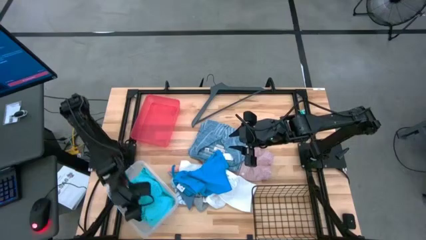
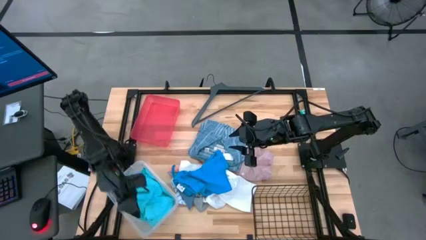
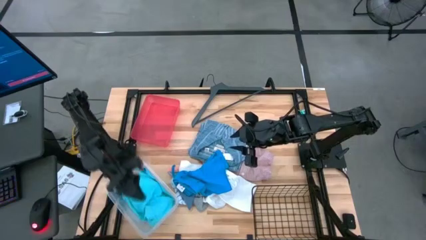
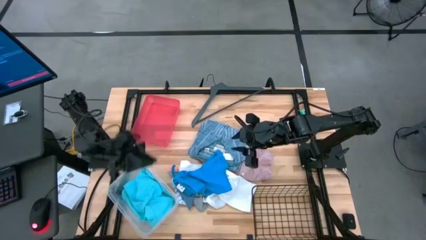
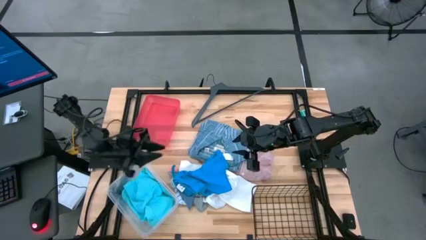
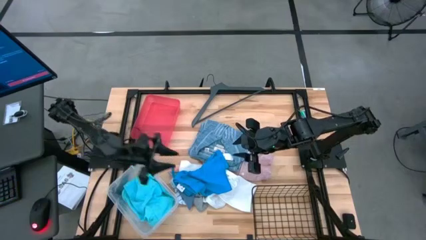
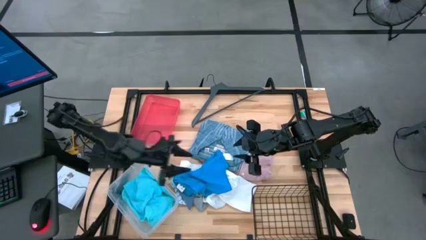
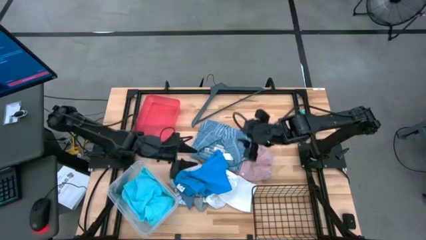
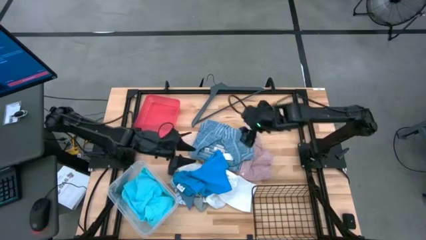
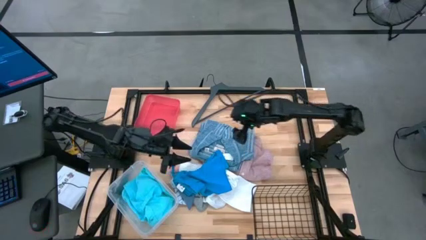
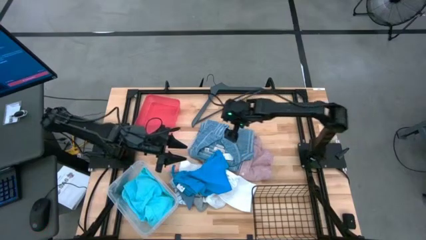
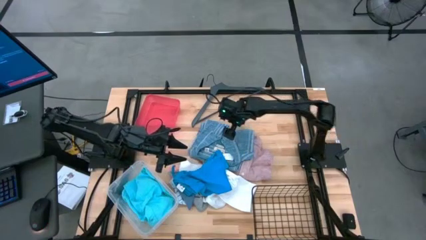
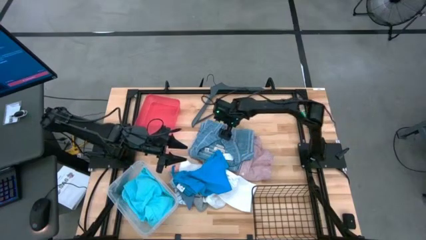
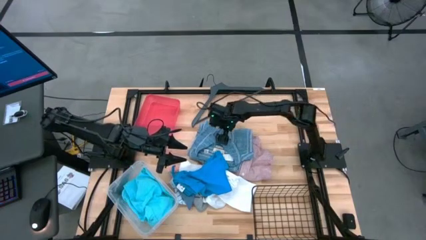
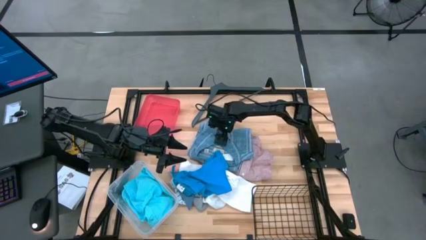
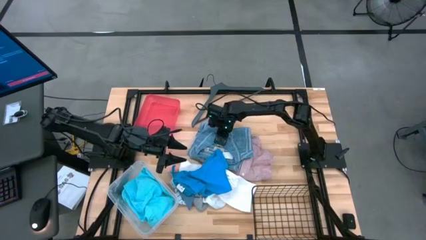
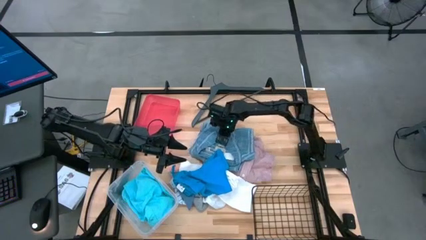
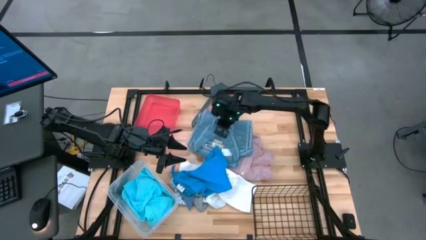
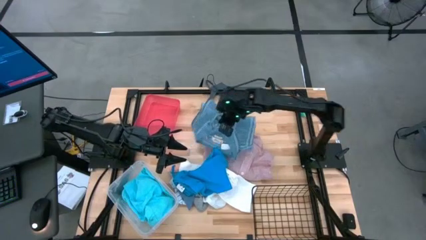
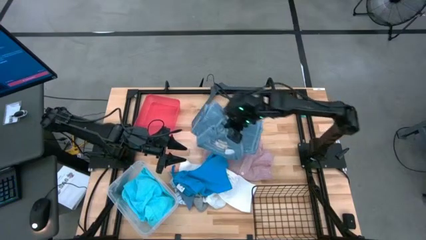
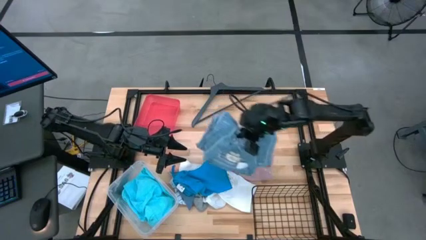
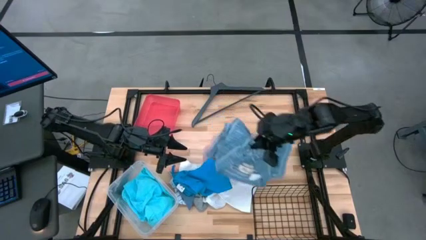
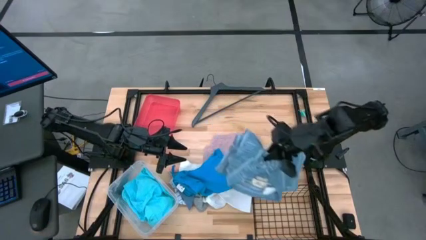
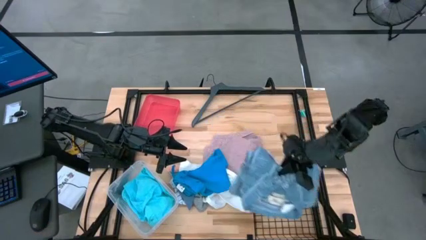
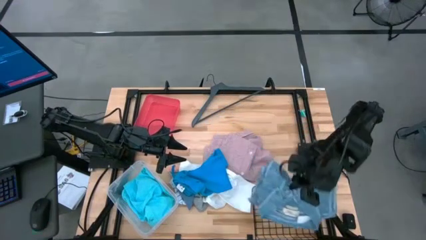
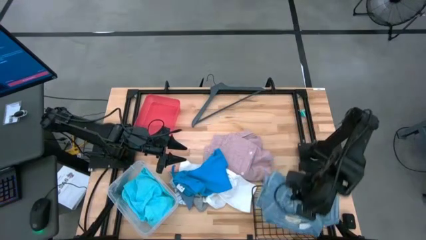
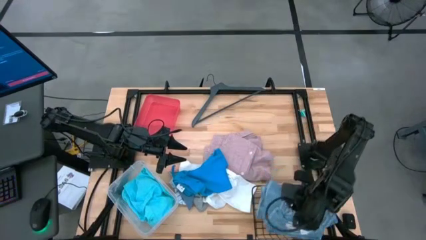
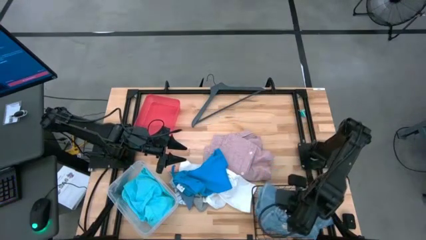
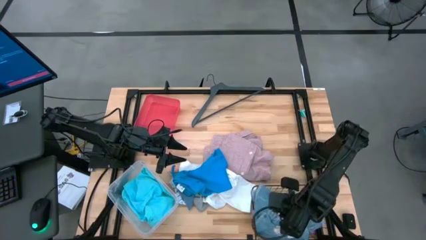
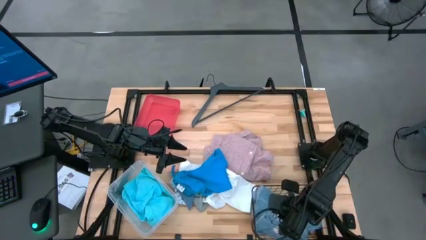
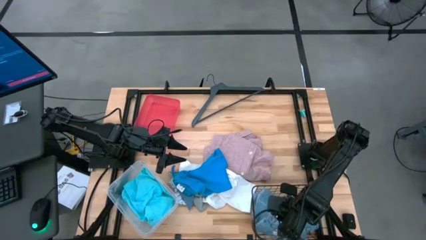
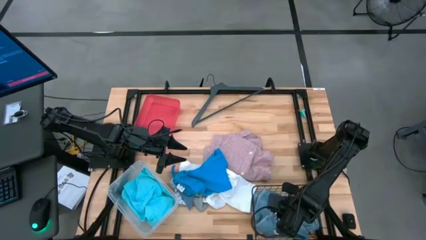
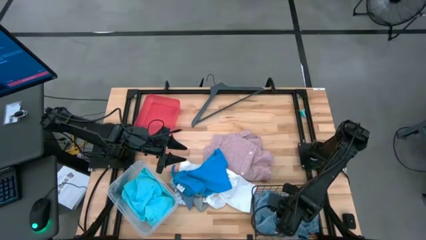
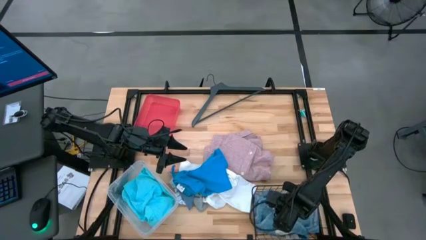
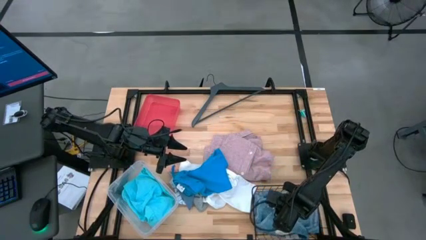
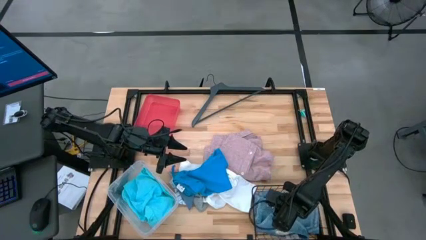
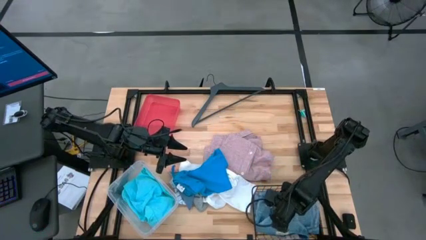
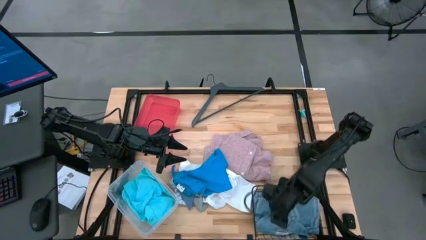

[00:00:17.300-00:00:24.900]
Task: Pick & Place Cloths
Put the blue striped polo shirt into the black wire basket

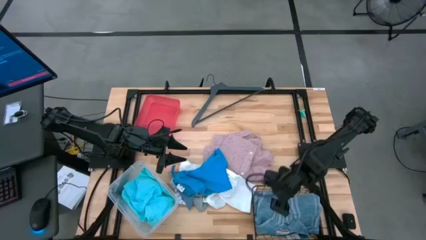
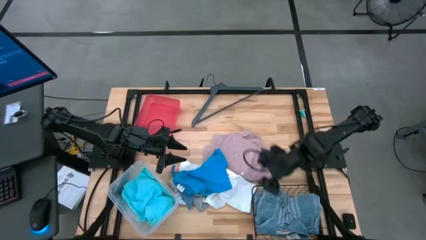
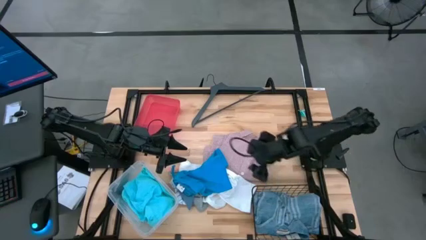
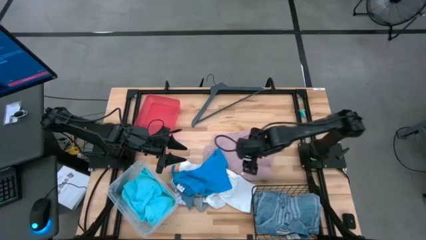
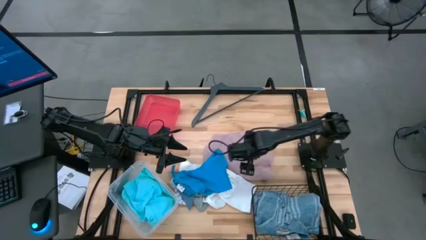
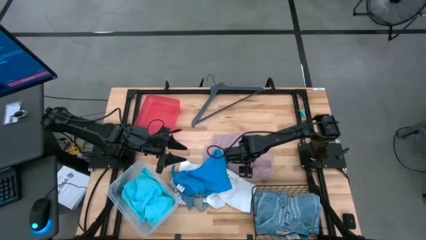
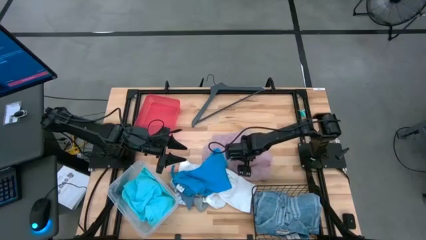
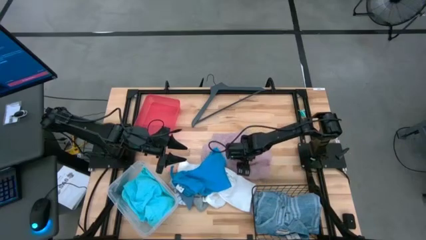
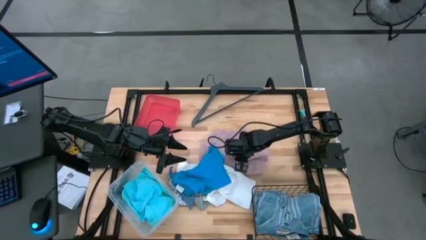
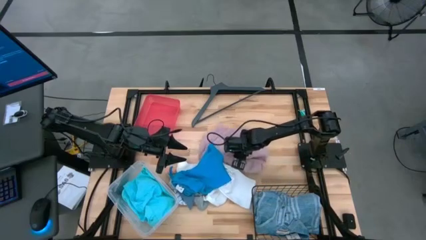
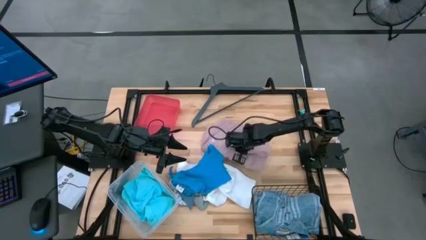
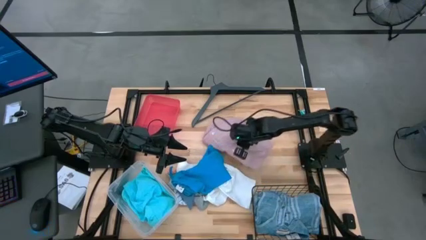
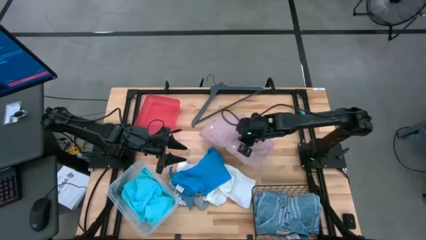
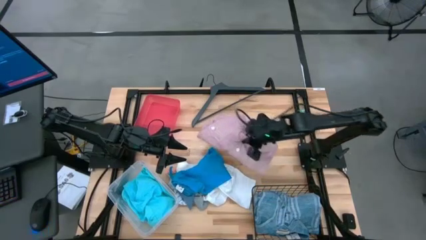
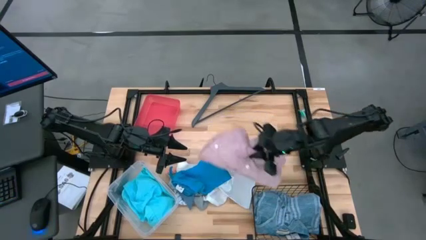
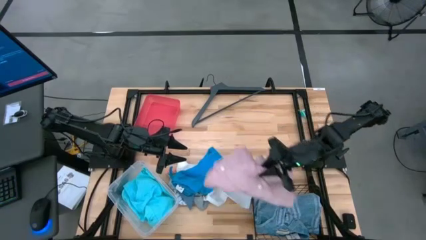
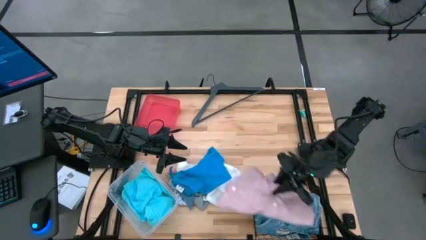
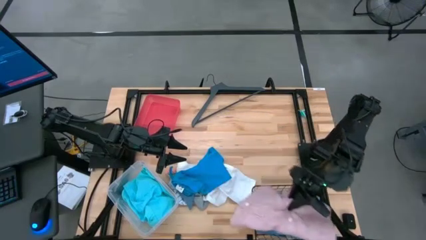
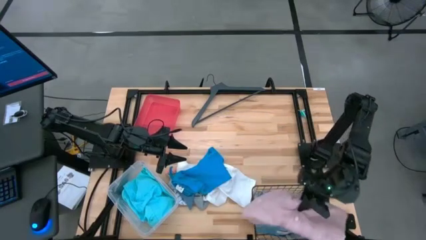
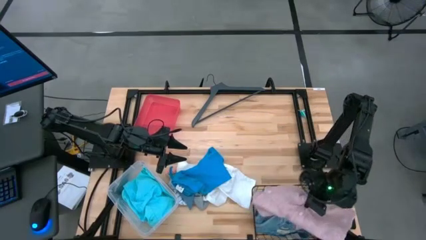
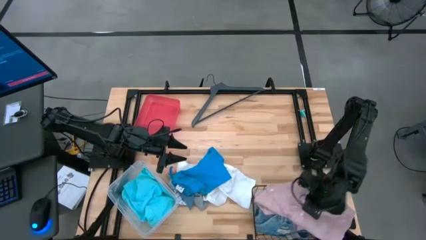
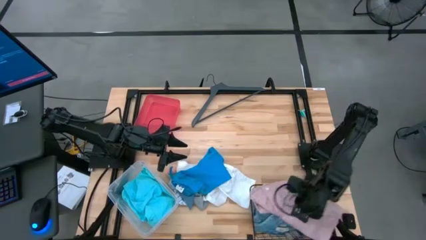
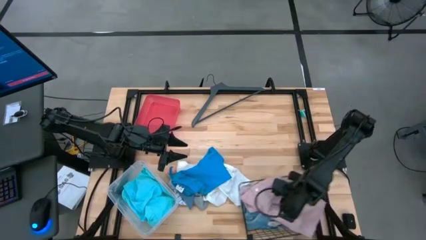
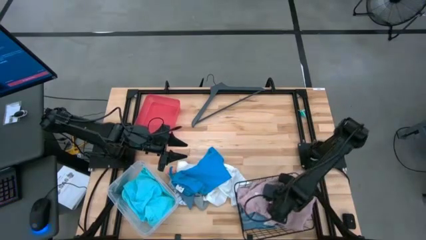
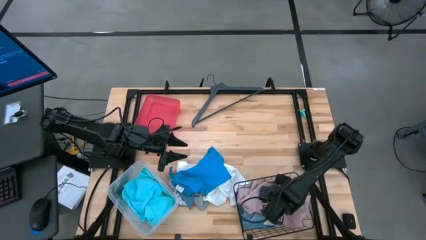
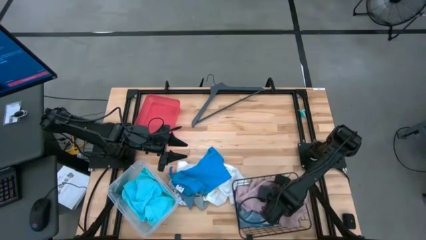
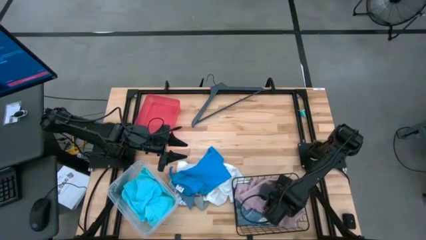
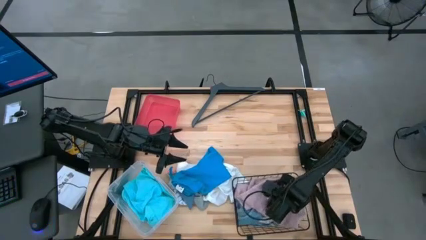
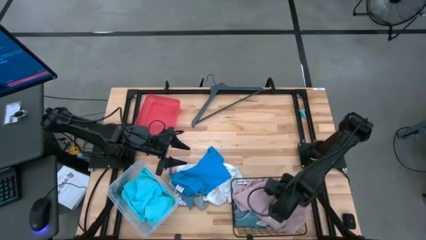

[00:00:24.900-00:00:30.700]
Put the pink polo shirt into the black wire basket

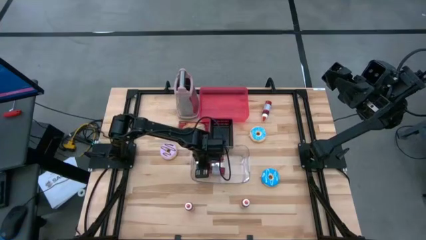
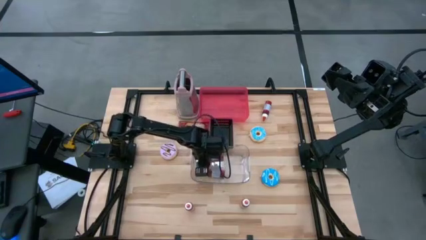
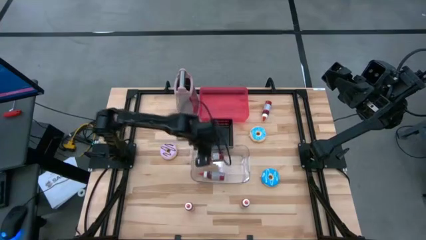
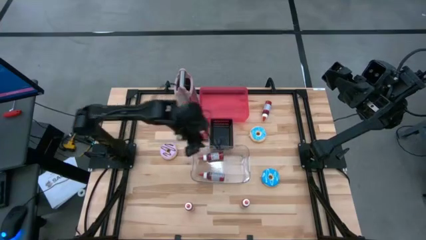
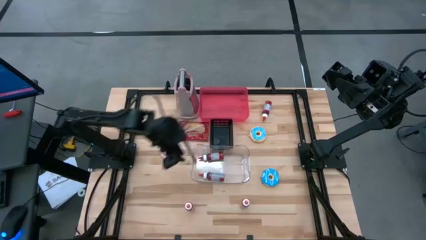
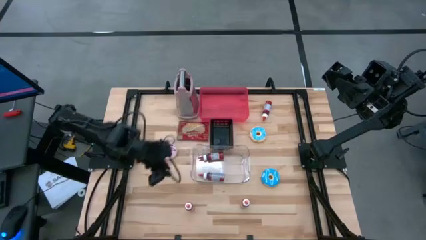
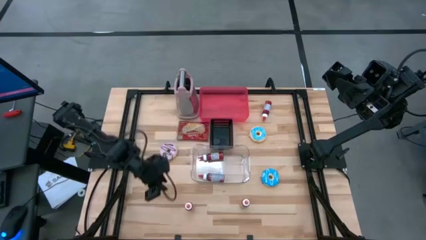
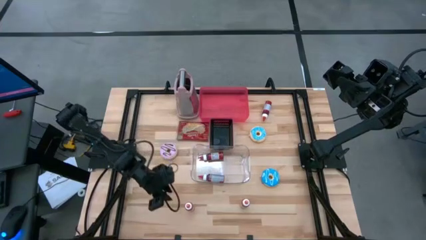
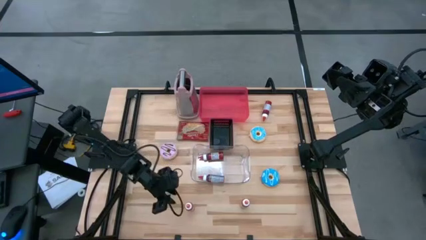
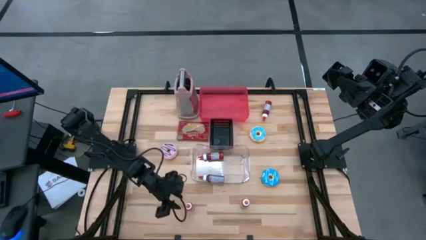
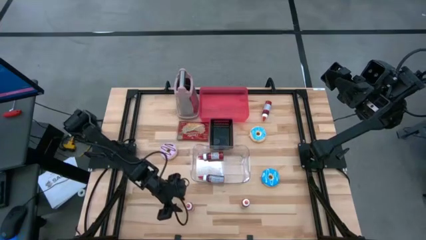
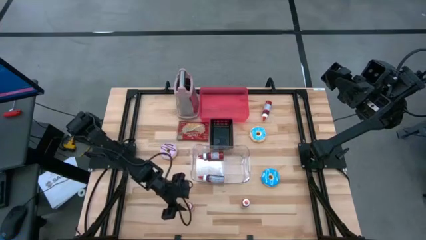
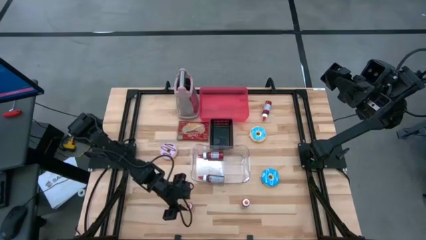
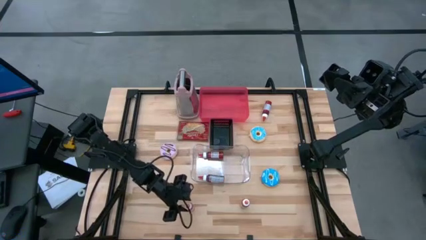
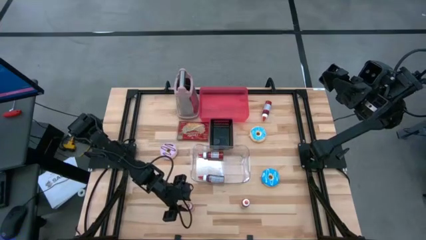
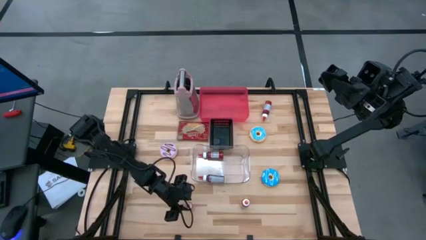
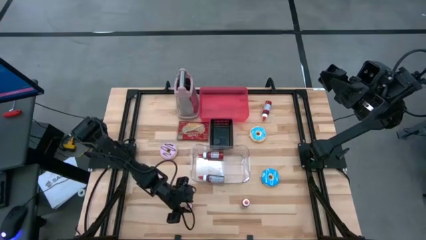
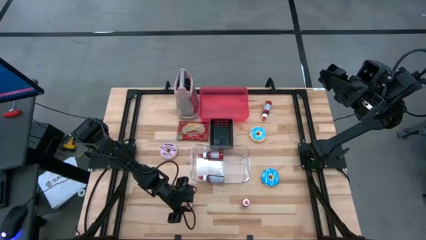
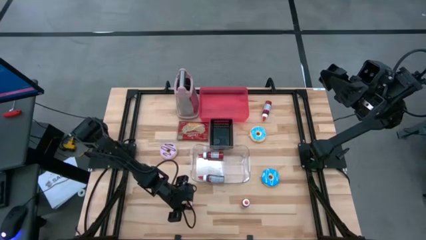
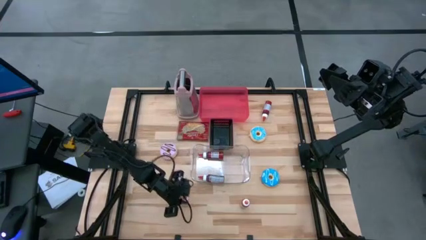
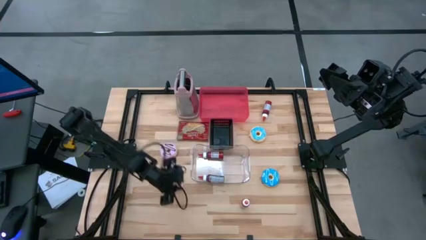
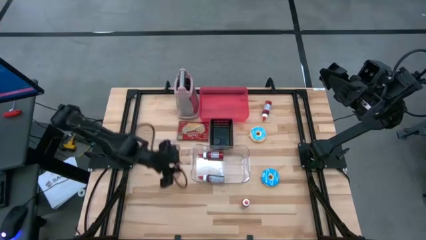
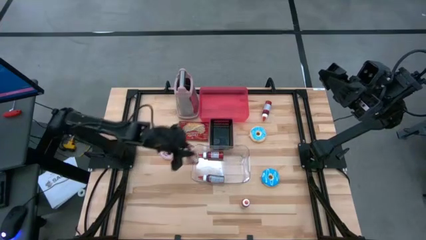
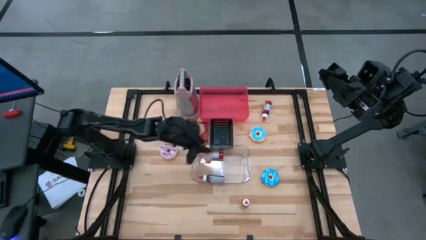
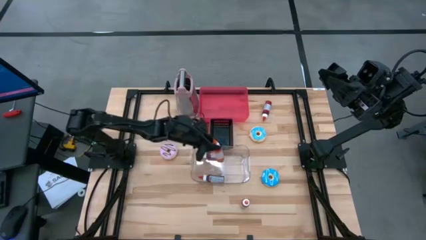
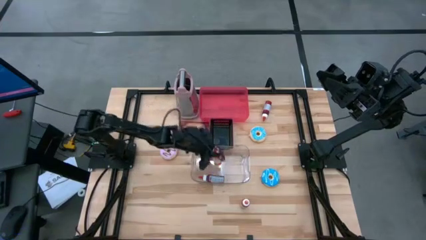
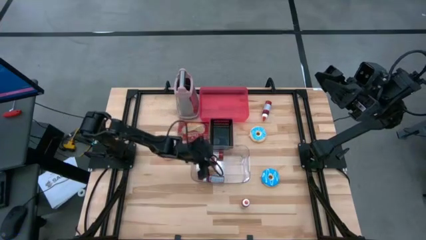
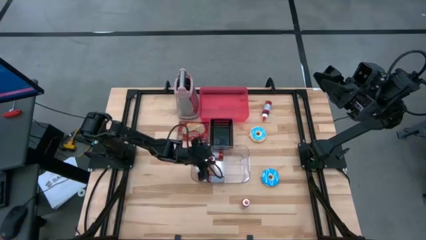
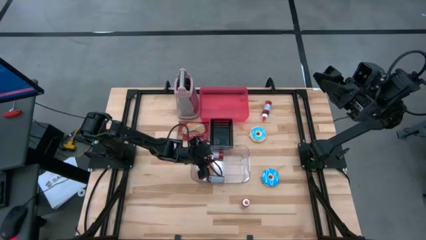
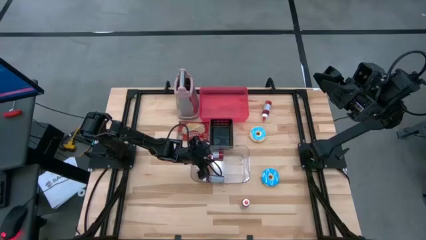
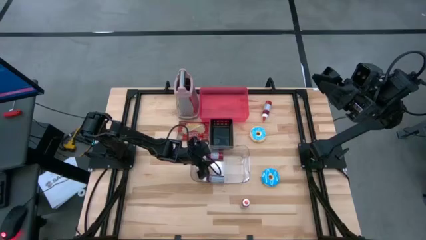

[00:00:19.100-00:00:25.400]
Task: Pick & Place Food Item
Put the left orange food coloring bottle into the transparent bin
